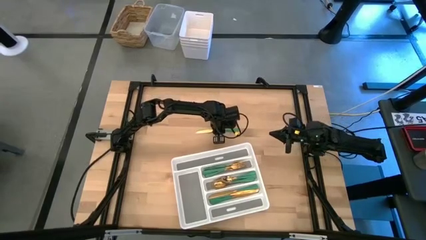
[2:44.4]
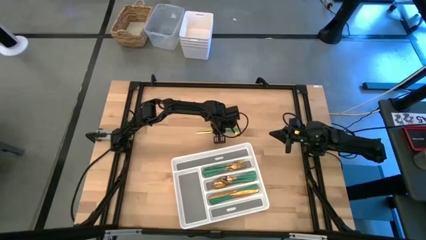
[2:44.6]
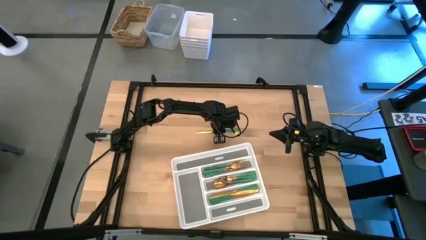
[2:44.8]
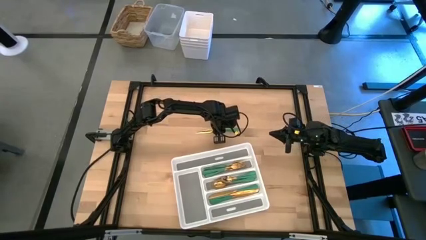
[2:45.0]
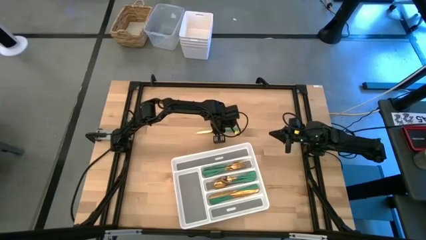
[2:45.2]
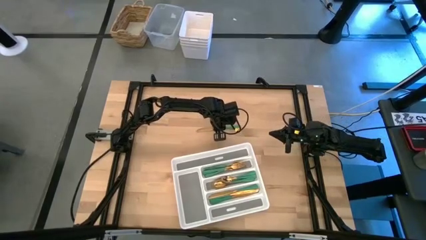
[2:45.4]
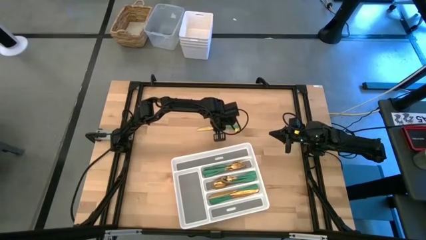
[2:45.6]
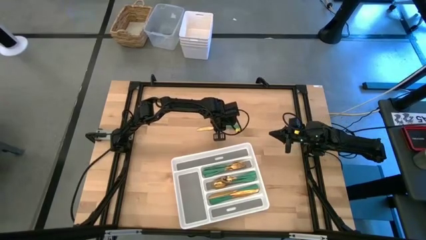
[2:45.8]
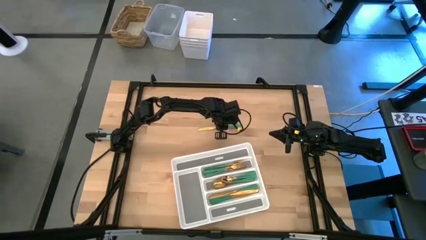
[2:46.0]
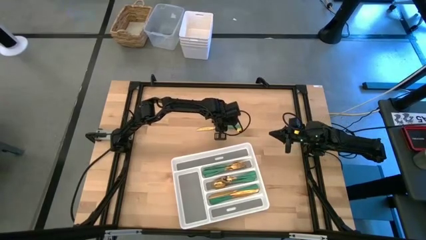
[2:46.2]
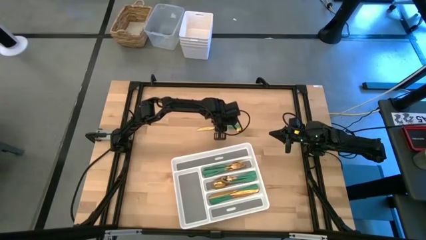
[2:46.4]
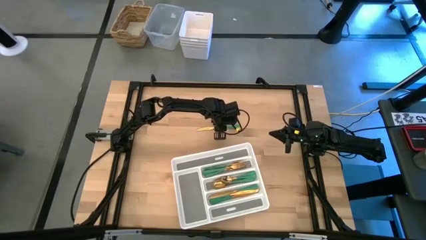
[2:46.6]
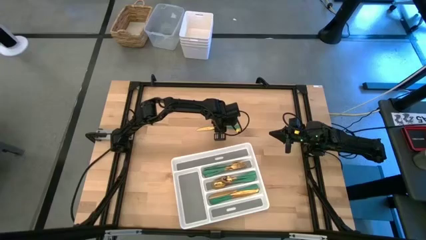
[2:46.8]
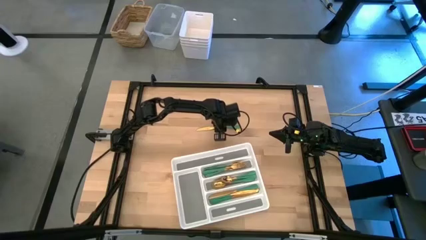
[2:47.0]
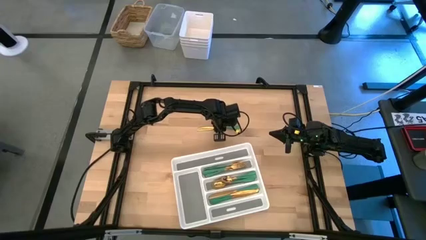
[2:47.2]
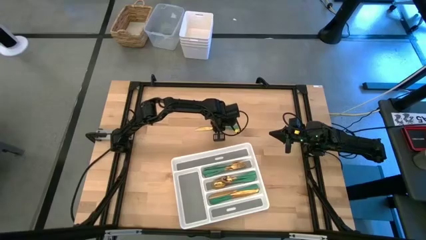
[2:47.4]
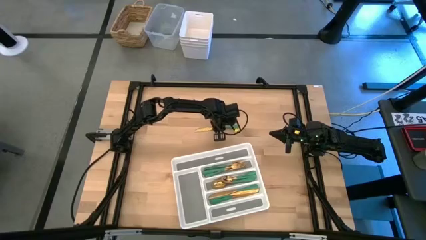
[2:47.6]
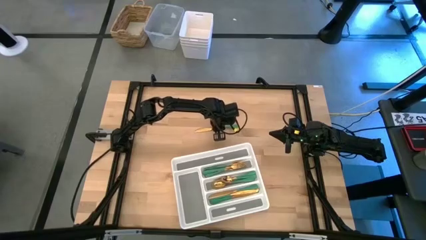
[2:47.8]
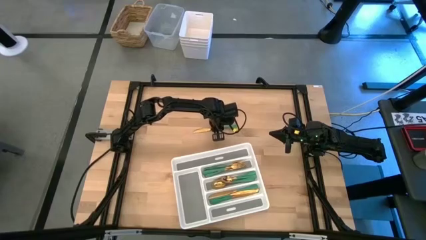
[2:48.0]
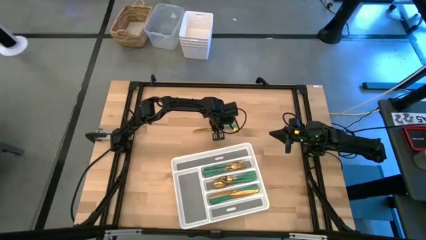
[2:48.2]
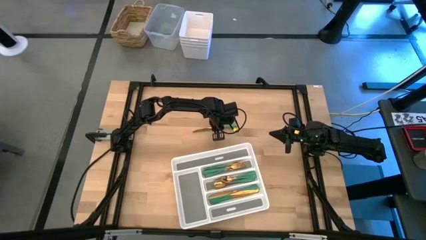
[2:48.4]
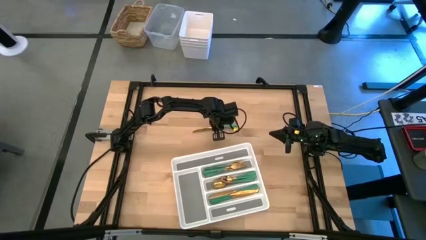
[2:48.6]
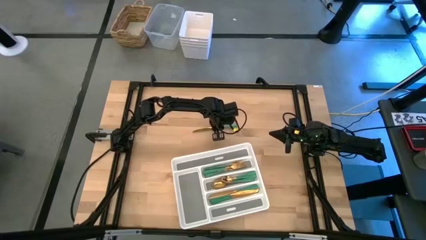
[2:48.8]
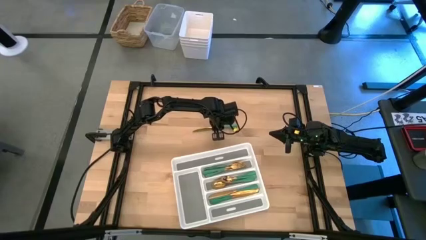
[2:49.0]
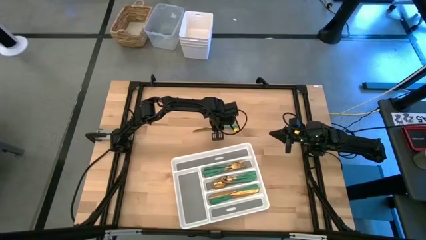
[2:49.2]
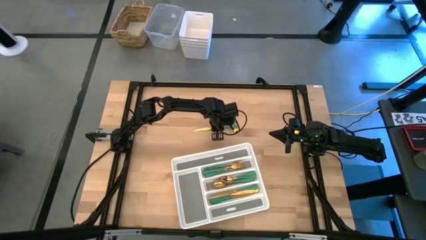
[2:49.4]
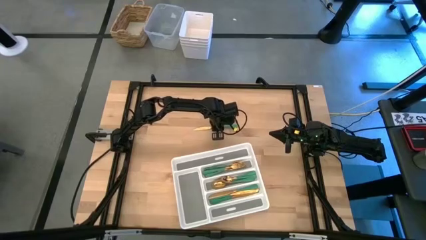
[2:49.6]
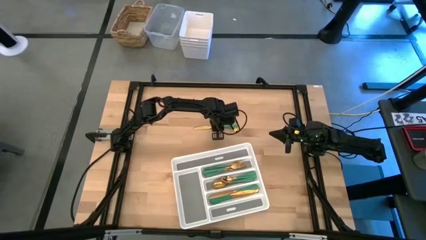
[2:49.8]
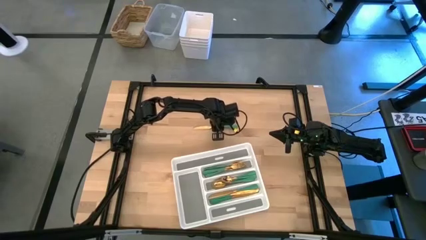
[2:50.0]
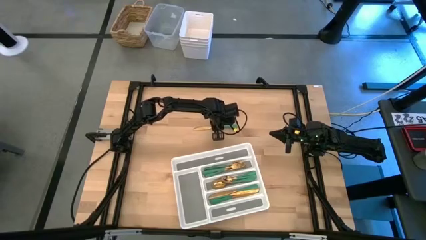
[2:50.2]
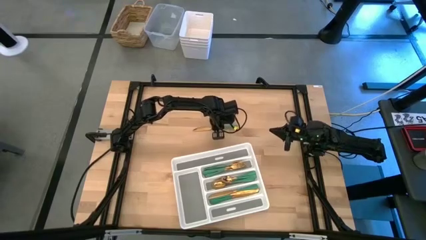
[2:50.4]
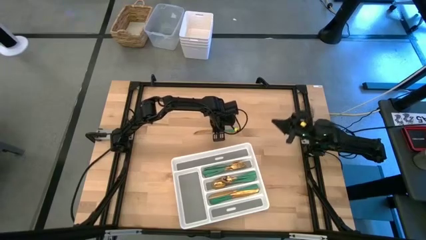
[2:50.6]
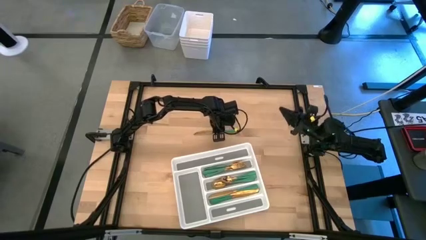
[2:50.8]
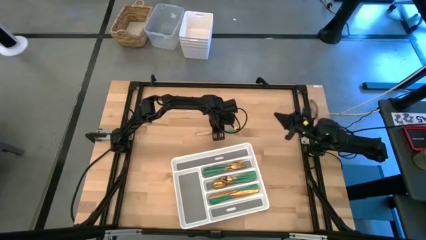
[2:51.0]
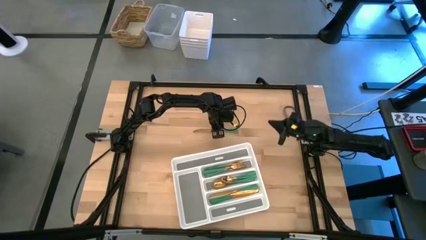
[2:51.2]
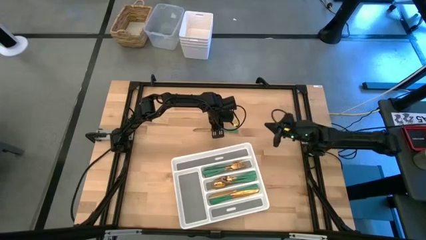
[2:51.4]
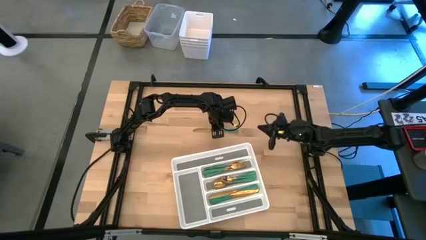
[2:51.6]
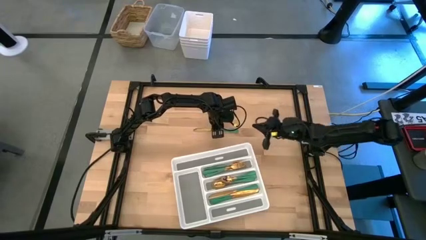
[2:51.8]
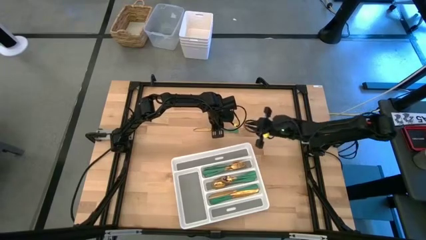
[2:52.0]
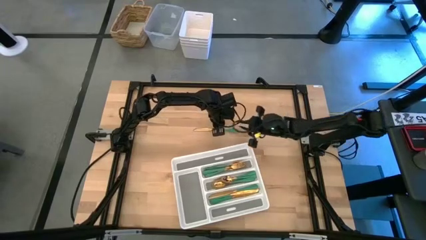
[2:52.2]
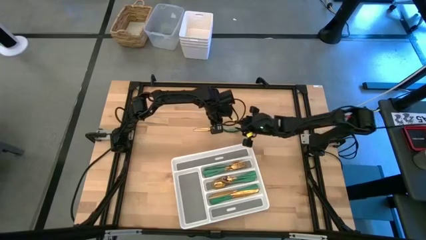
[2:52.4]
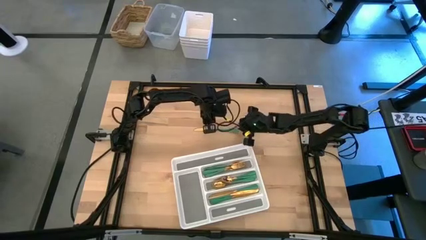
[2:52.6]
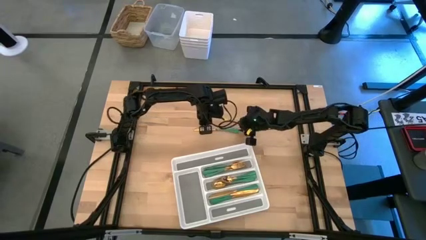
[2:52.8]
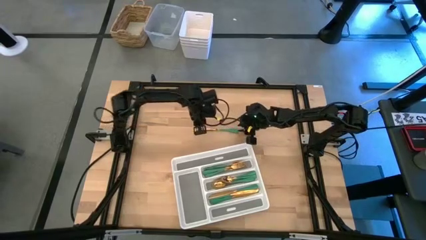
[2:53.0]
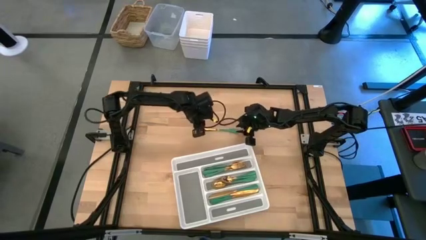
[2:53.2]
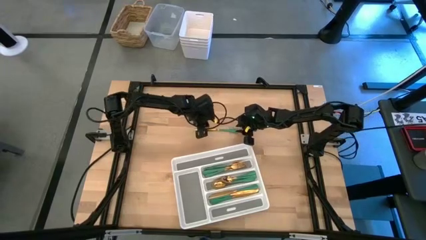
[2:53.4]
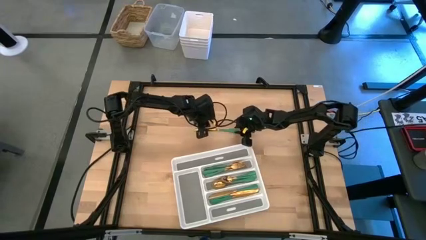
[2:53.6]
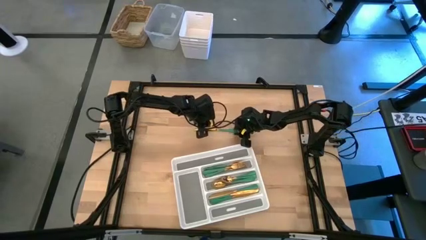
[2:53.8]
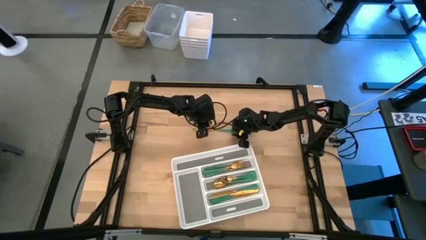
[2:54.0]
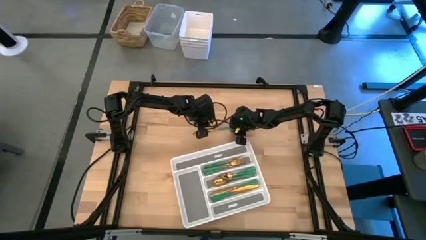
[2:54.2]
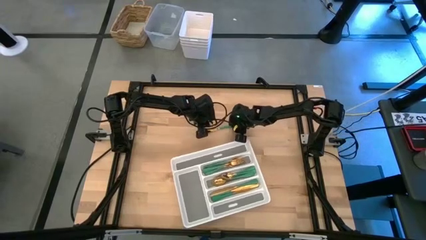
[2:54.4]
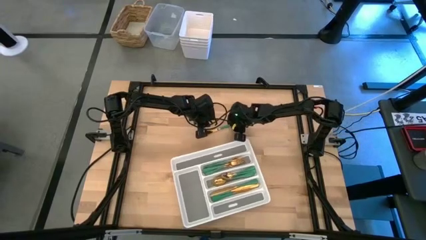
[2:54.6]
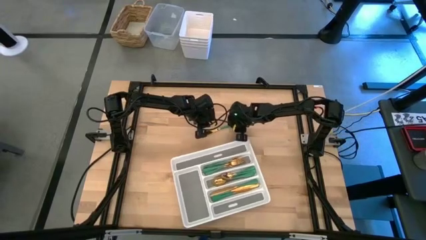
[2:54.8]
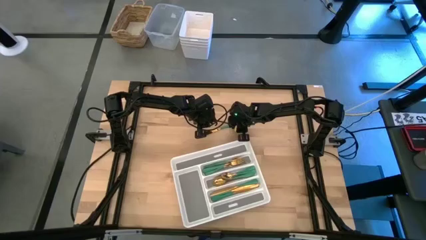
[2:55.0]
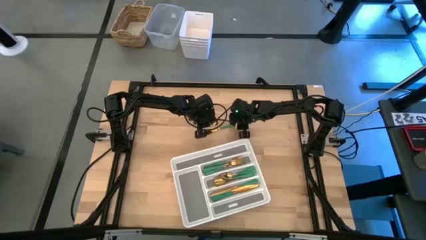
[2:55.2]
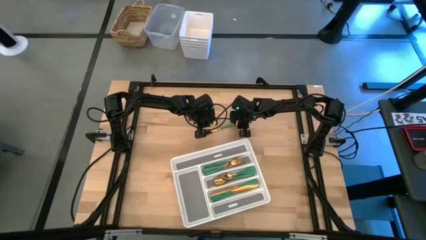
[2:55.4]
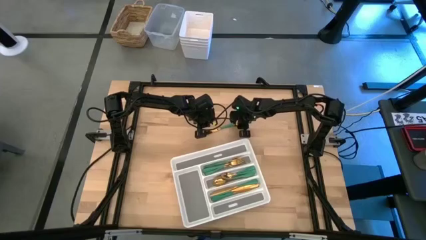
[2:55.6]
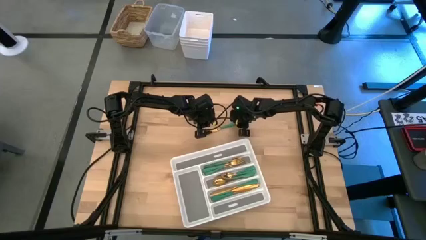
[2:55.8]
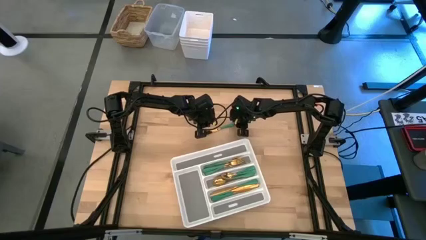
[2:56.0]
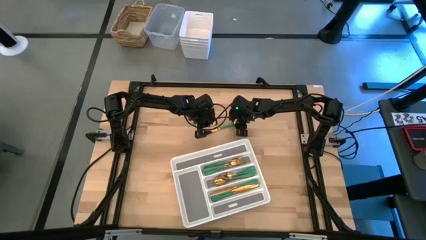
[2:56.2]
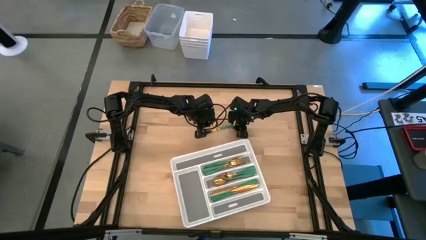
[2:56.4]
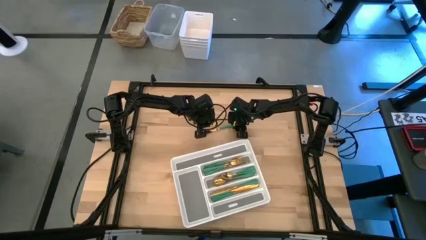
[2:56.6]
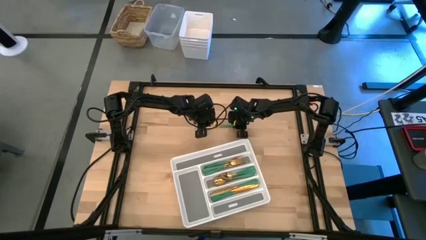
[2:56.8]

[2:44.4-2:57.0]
Task: Sort silverware
Put the green spoon into the white silverware tray

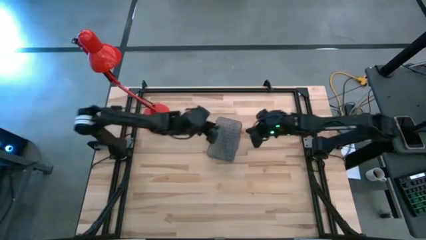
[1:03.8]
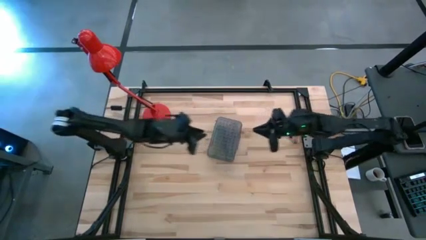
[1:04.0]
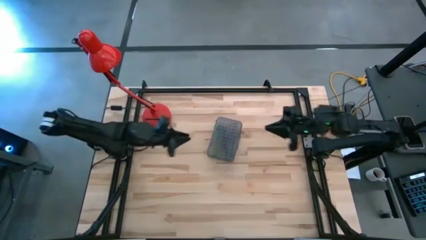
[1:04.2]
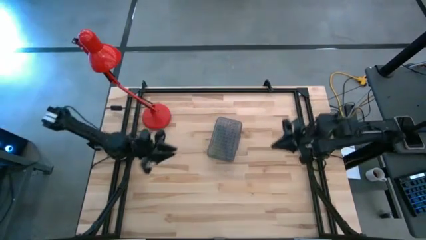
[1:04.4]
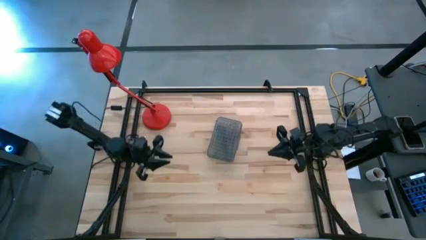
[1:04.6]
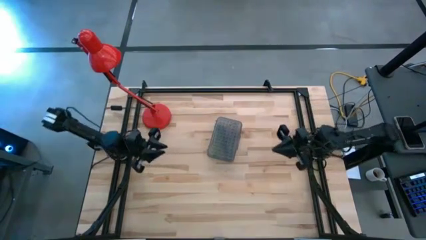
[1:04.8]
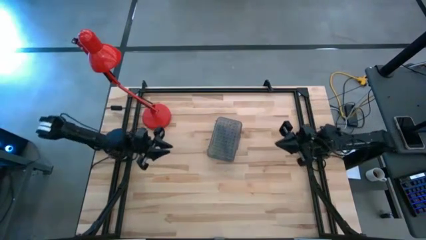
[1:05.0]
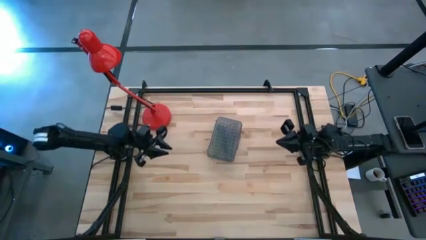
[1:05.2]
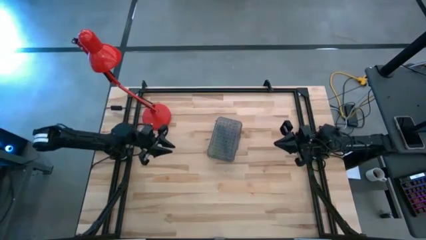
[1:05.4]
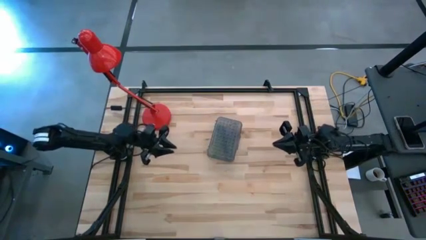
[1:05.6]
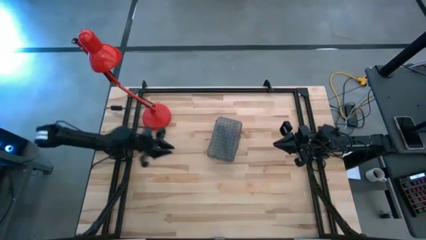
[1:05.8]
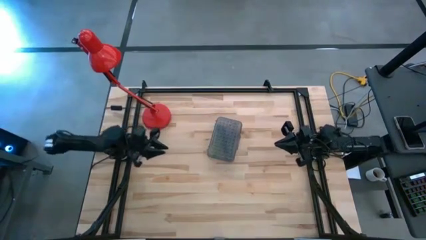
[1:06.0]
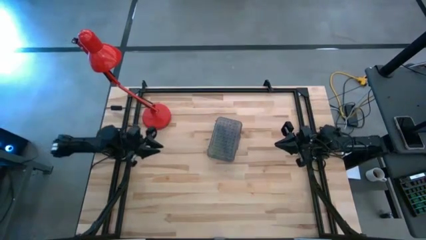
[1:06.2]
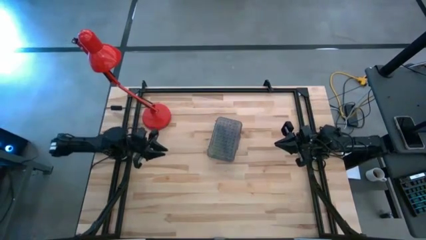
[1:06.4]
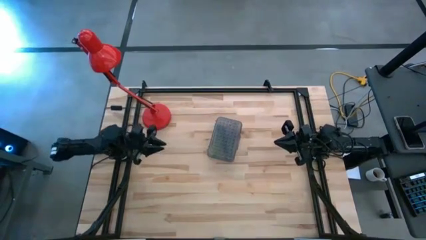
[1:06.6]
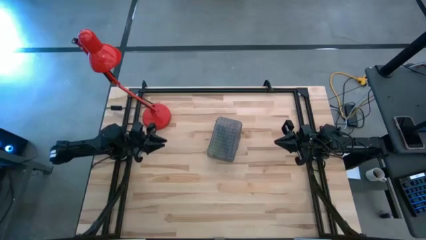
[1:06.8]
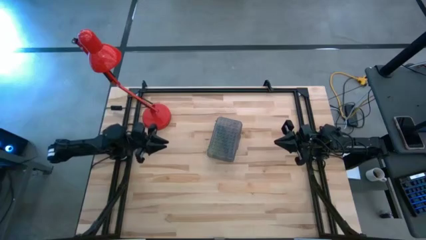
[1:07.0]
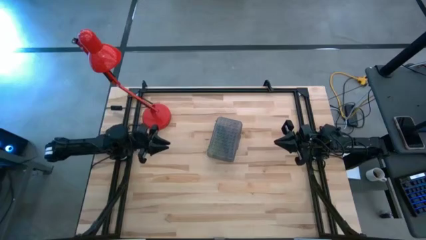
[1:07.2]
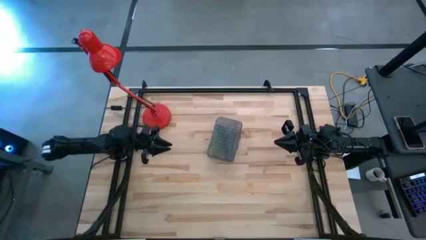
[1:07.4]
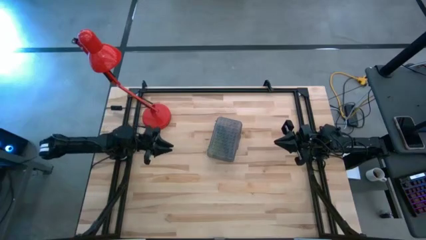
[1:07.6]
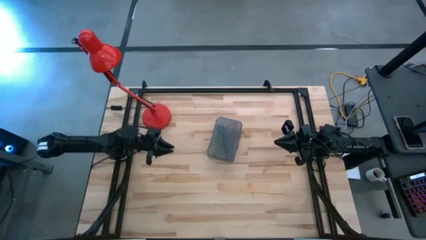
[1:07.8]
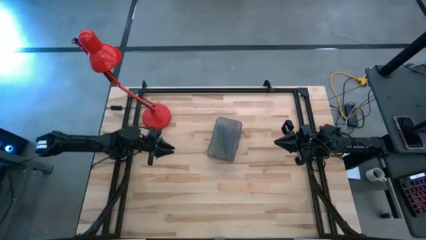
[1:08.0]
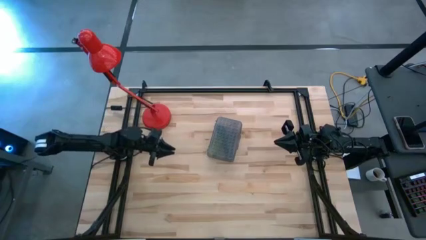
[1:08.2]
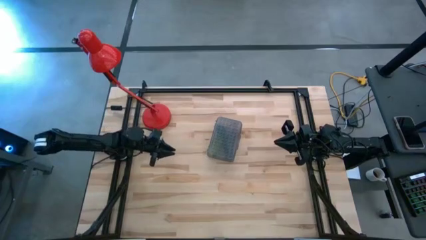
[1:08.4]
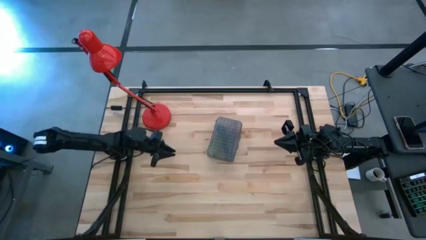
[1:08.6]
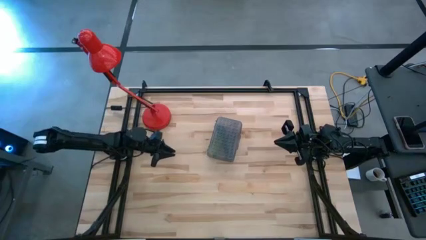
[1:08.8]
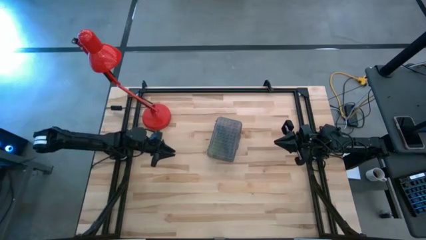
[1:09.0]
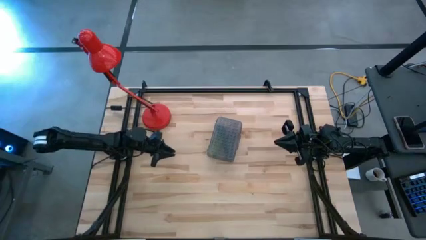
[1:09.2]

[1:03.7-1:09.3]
Task: Pick & place school supplies into a supply box
Return to Home Position
